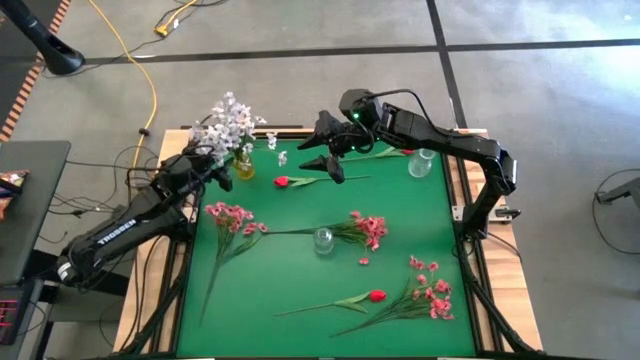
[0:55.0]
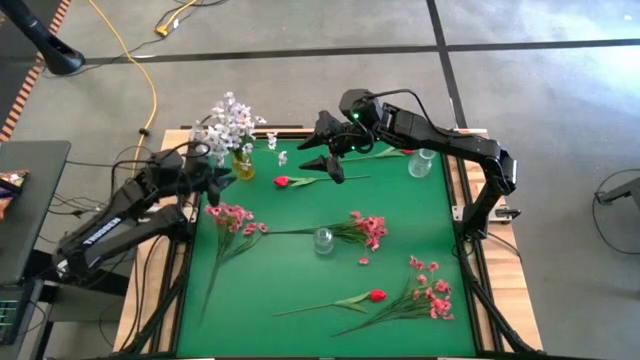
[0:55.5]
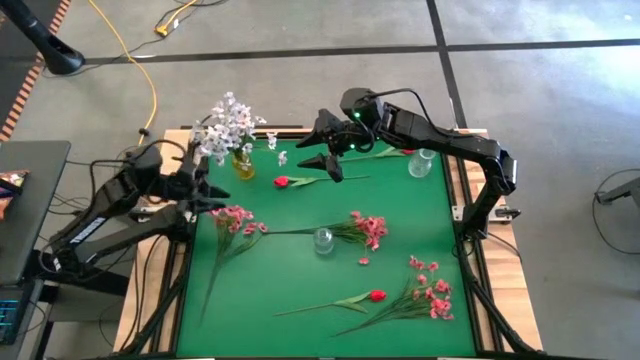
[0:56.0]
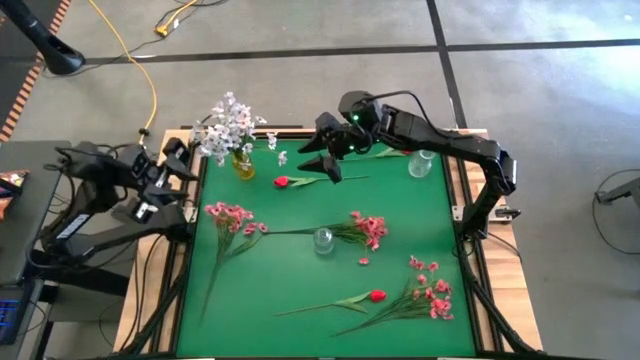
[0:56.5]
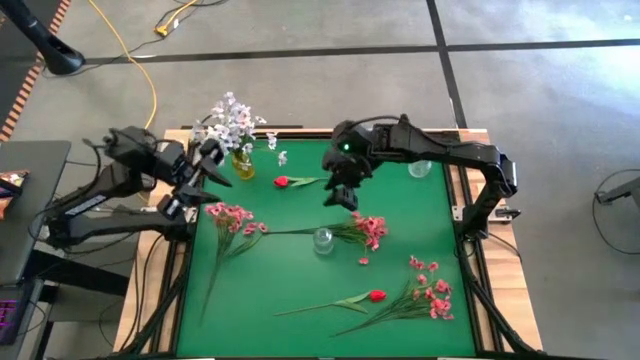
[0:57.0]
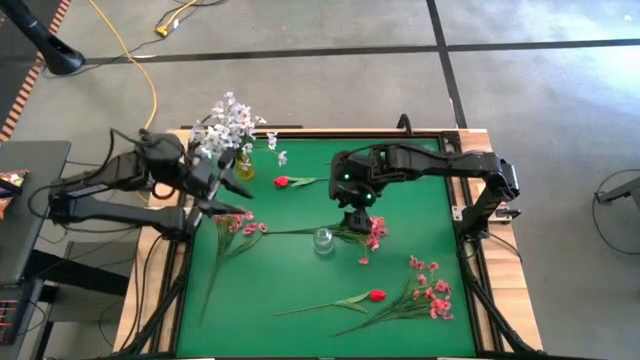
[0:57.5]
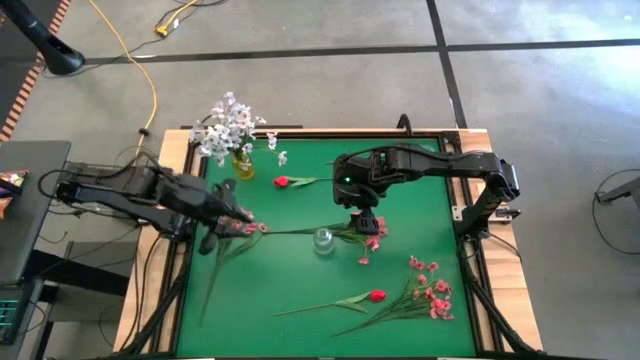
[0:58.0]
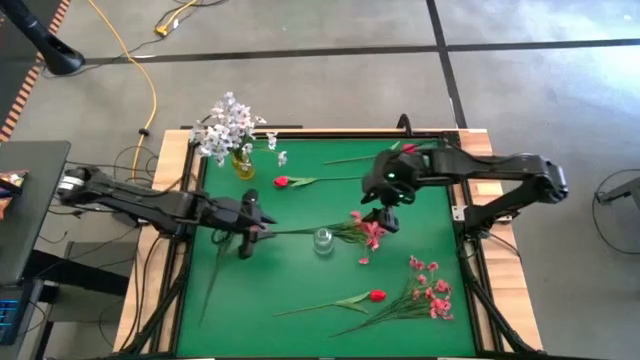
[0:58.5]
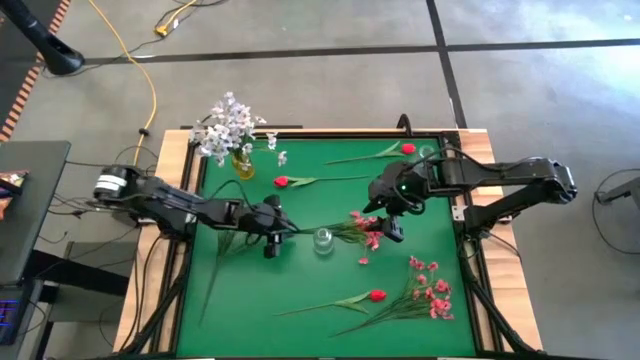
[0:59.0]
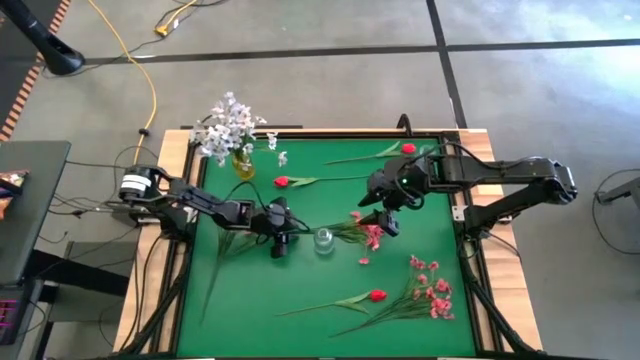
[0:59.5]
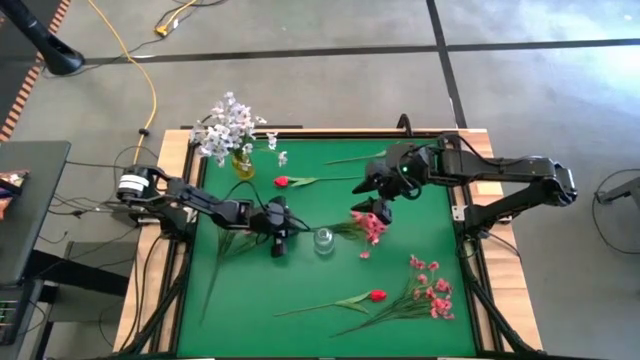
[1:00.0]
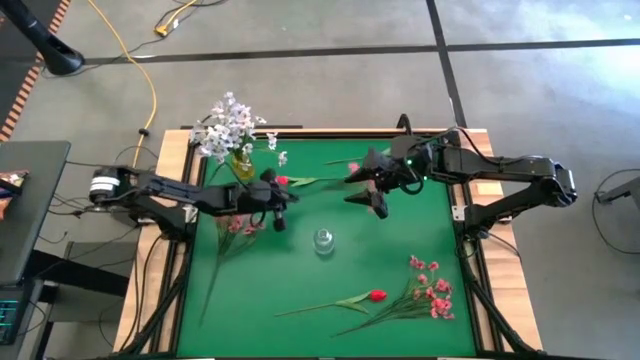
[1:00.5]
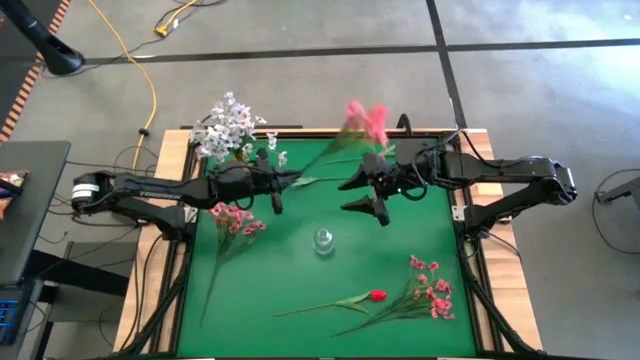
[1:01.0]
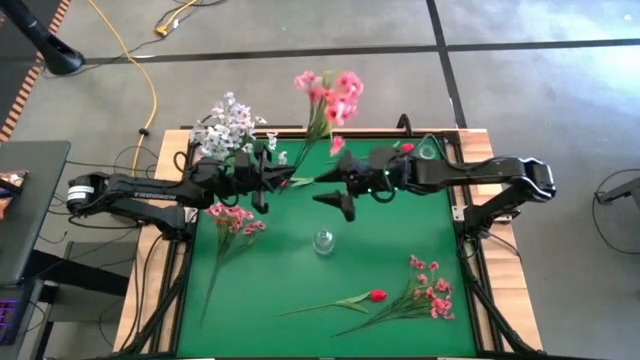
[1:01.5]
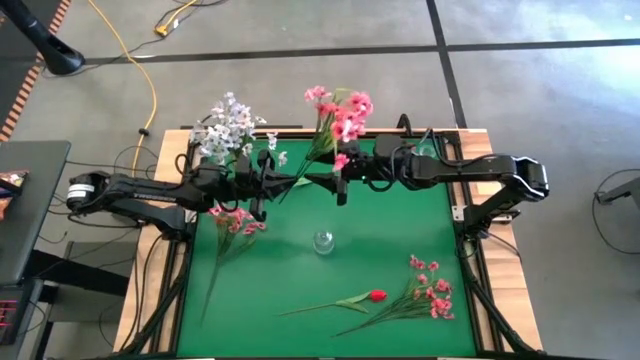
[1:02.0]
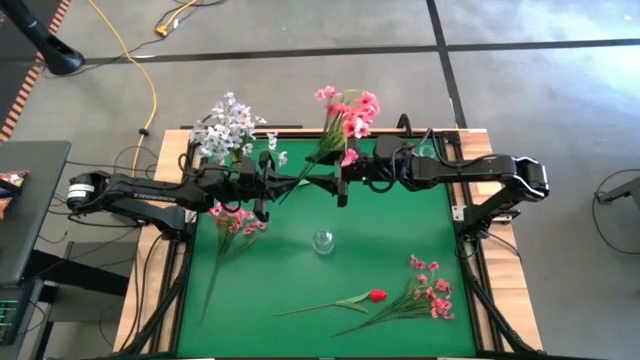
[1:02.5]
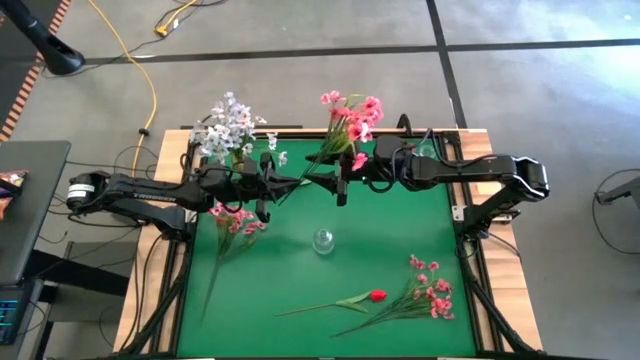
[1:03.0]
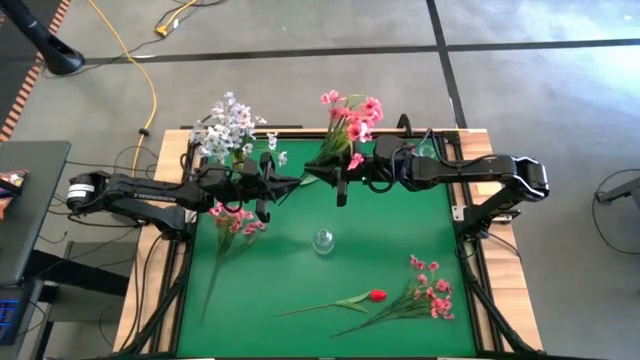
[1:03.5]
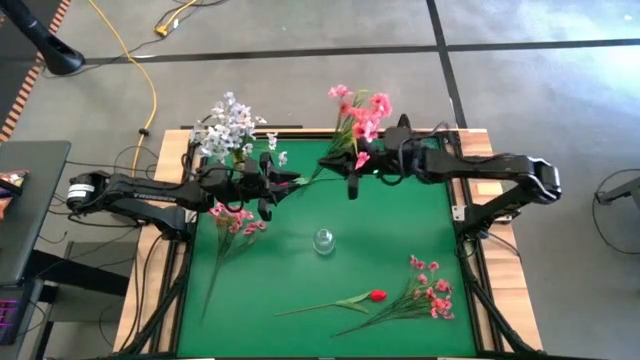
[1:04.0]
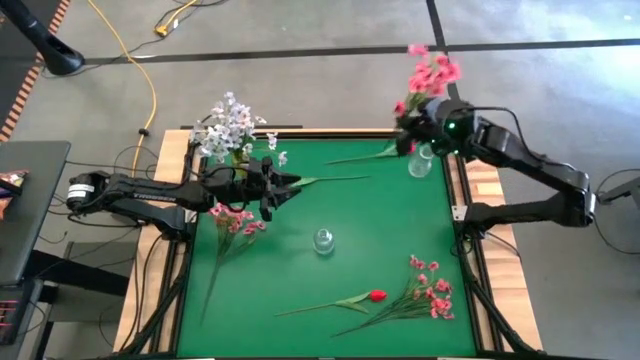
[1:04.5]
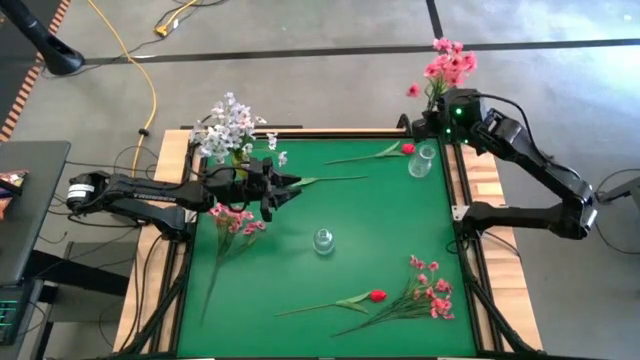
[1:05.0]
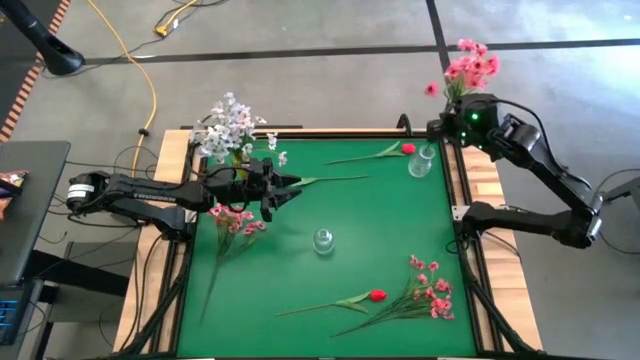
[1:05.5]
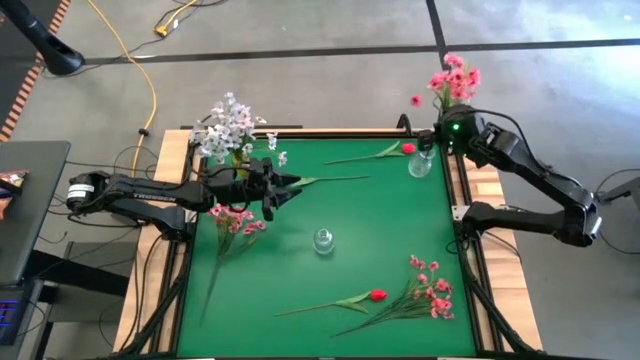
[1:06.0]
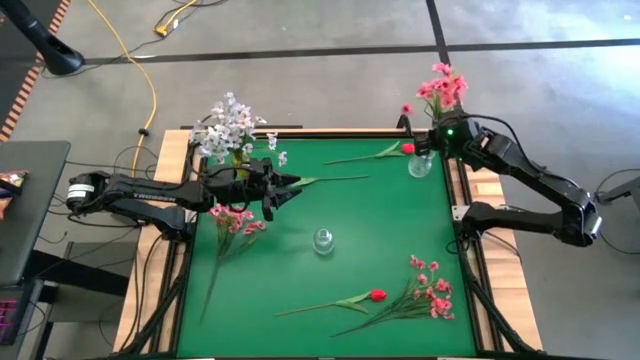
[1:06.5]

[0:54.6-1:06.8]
Task: Sort flowers into vase by color
Put the middle pink flowers into the top transparent vase

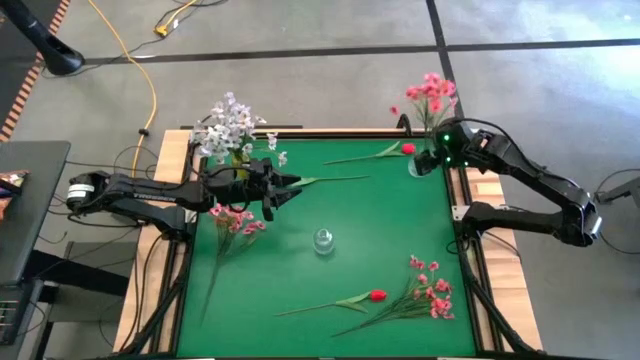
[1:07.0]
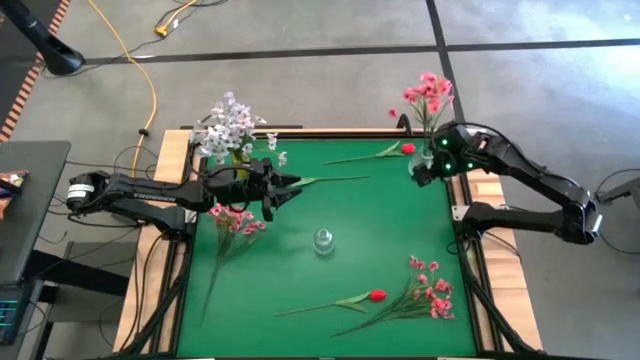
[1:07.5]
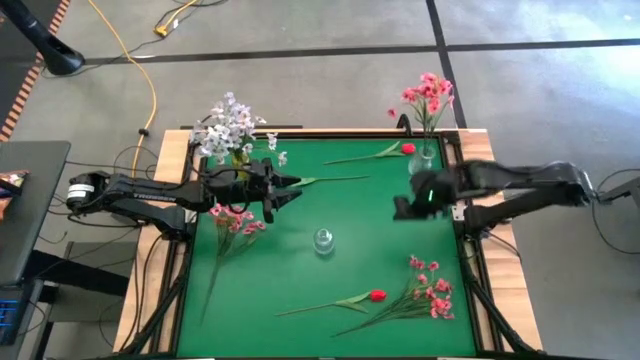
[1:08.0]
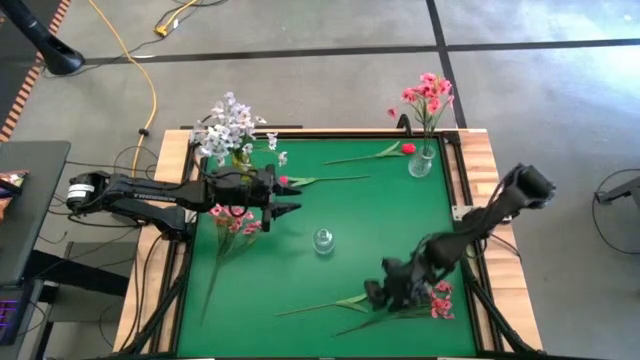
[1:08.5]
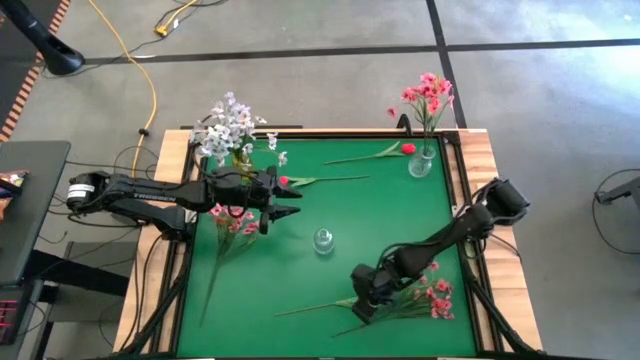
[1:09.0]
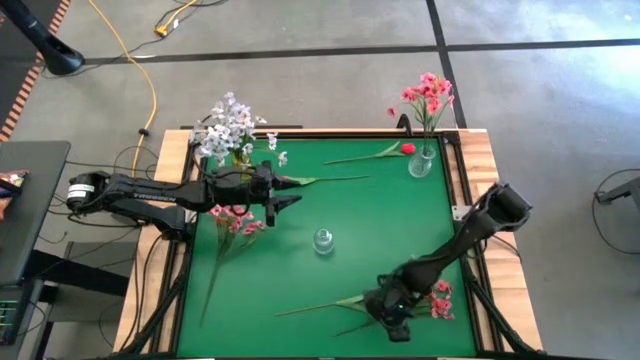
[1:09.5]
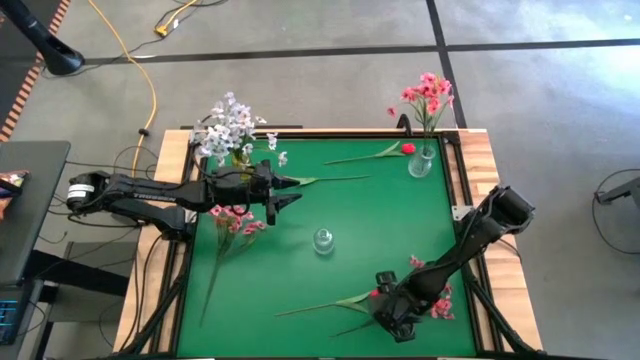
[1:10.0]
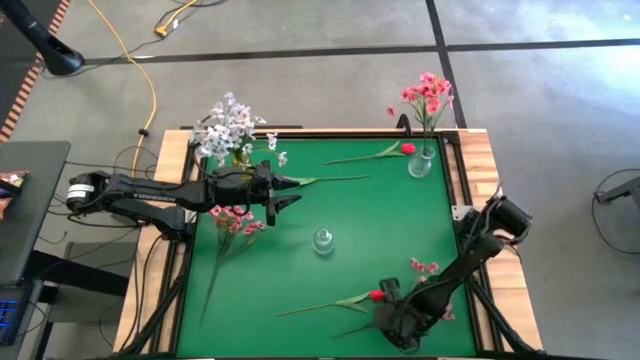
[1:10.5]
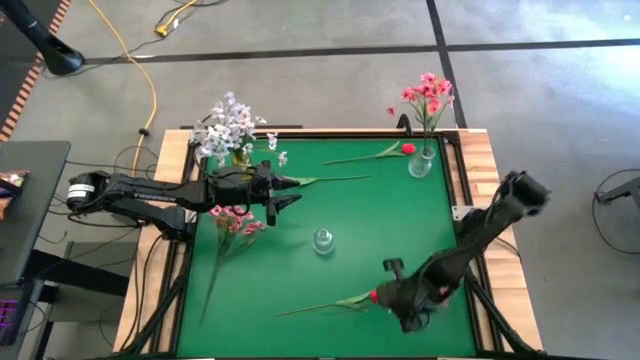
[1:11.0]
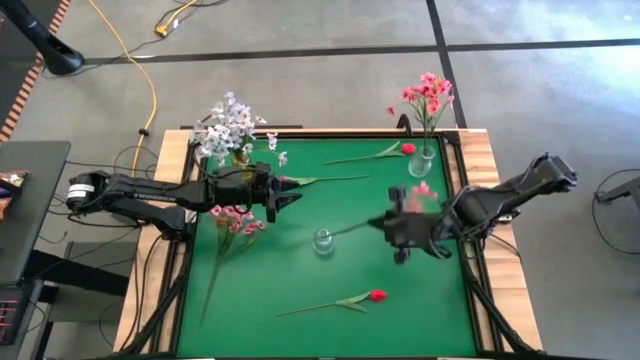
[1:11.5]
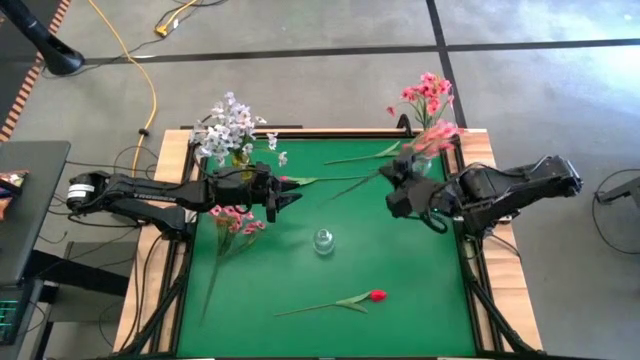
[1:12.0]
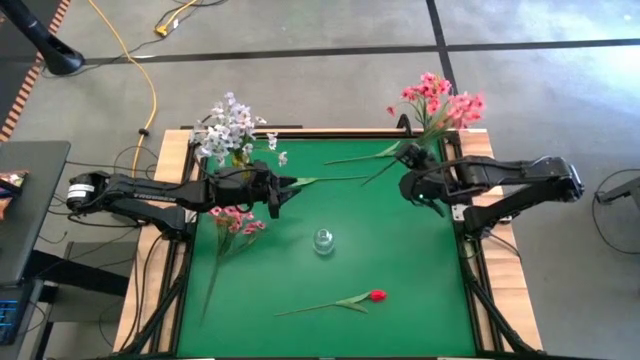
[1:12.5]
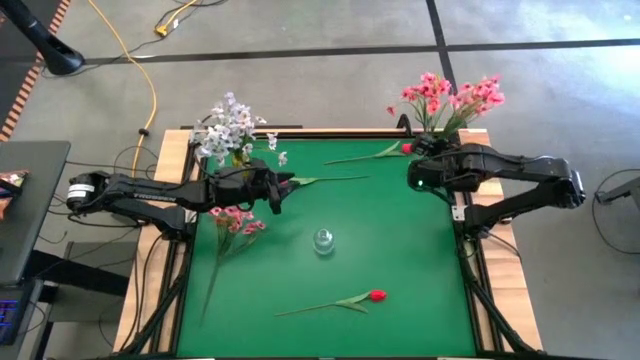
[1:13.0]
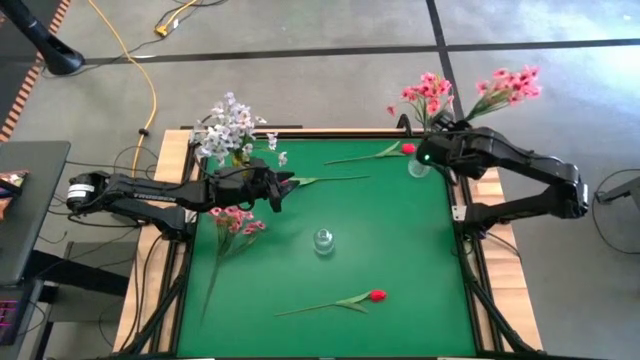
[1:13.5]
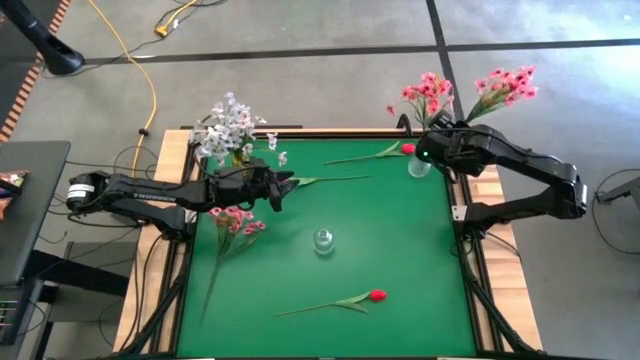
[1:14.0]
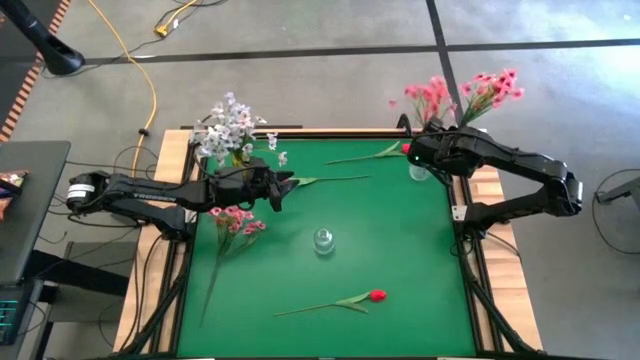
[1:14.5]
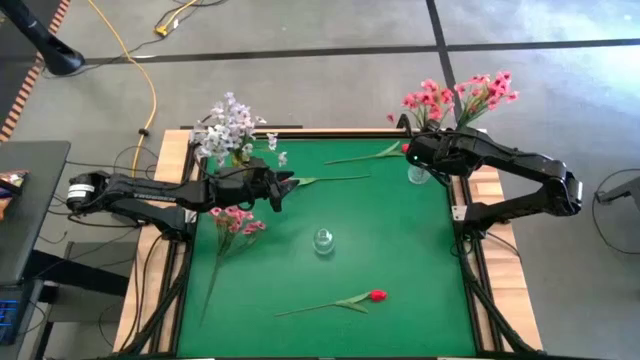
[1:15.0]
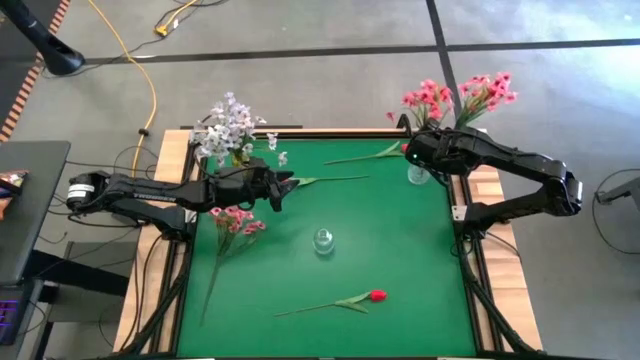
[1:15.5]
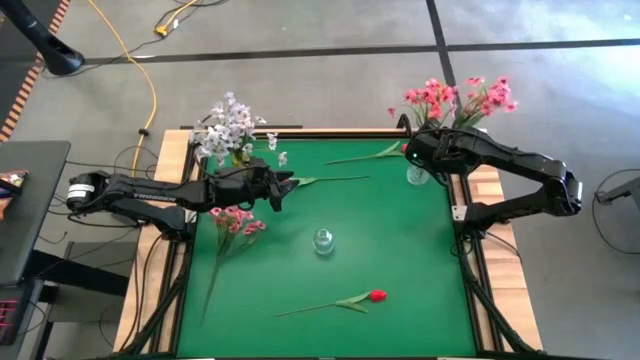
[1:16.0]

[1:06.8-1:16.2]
Put the bottom pink flowers into the top transparent vase
